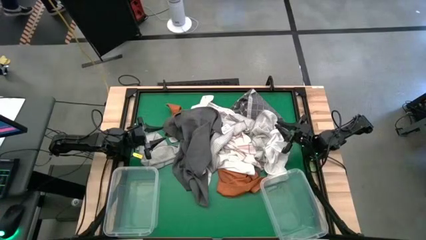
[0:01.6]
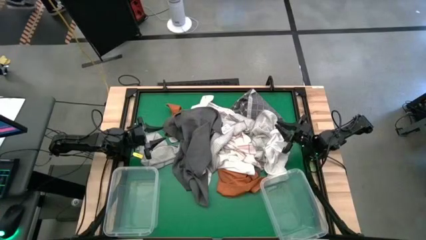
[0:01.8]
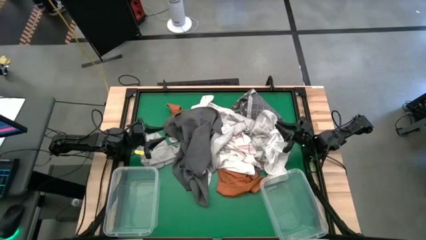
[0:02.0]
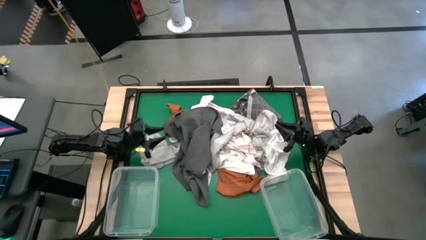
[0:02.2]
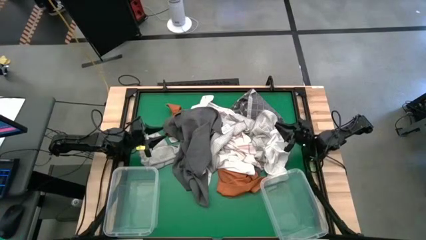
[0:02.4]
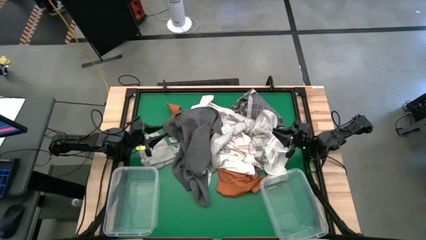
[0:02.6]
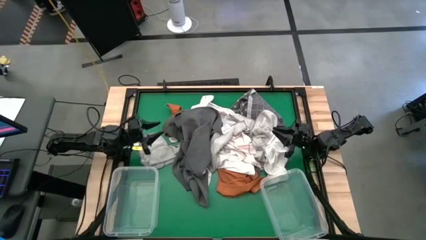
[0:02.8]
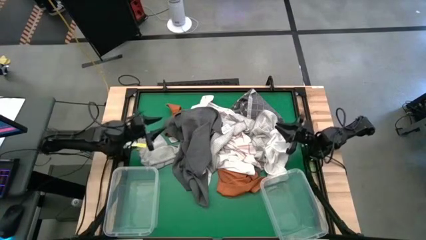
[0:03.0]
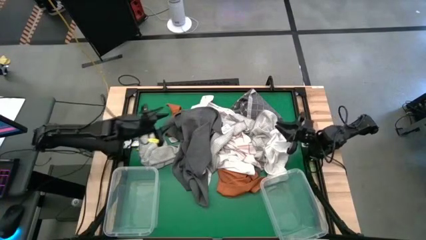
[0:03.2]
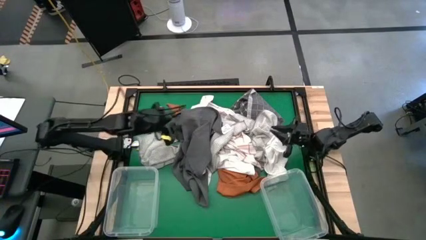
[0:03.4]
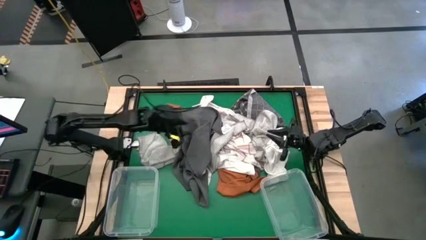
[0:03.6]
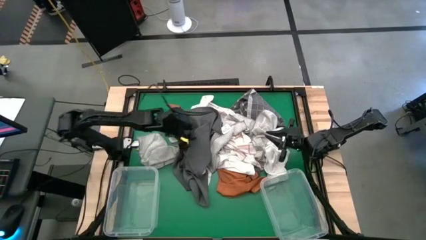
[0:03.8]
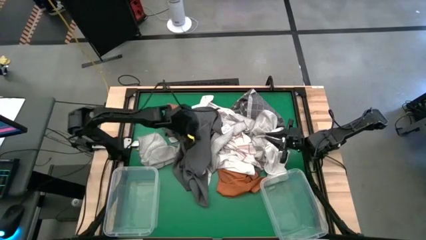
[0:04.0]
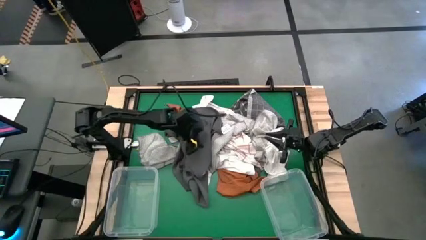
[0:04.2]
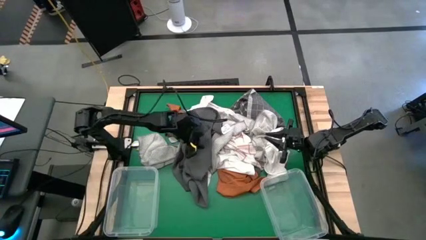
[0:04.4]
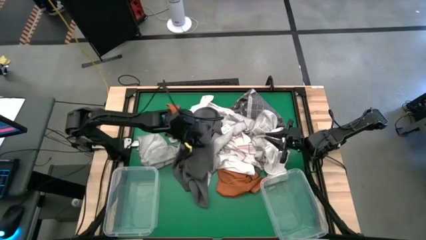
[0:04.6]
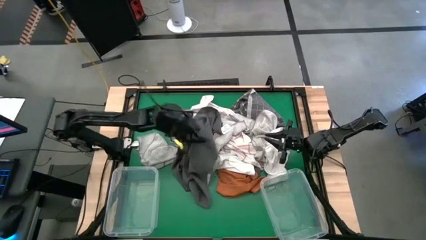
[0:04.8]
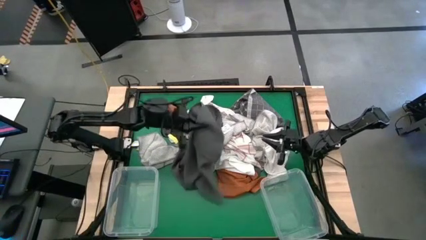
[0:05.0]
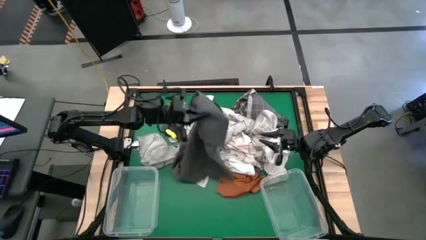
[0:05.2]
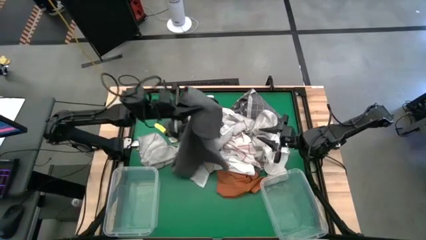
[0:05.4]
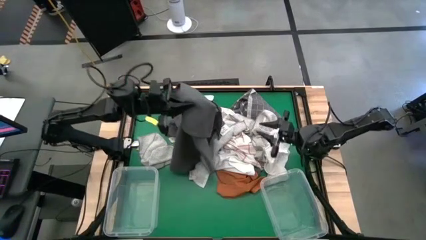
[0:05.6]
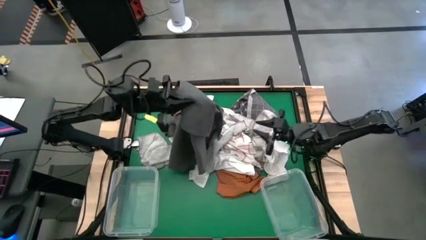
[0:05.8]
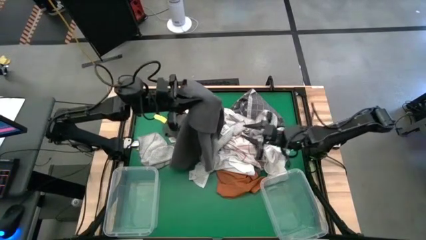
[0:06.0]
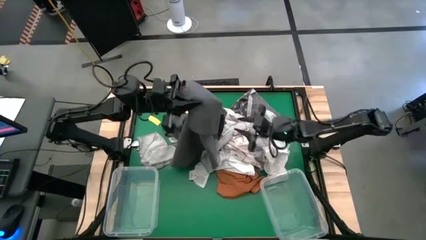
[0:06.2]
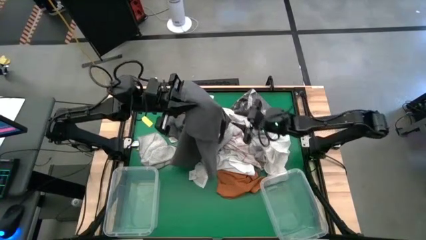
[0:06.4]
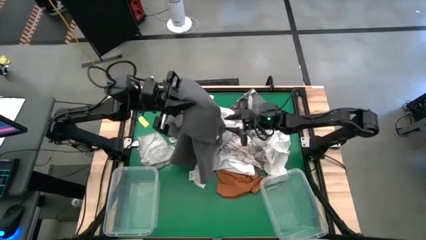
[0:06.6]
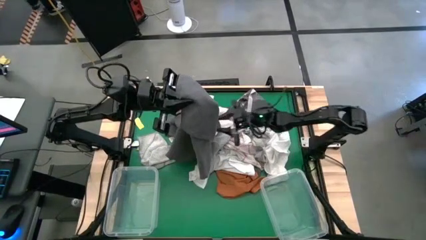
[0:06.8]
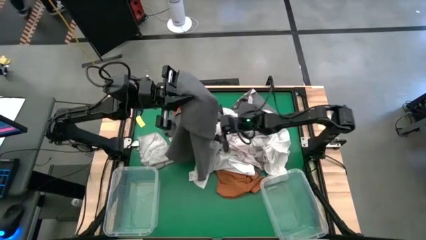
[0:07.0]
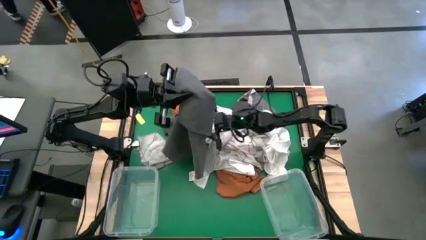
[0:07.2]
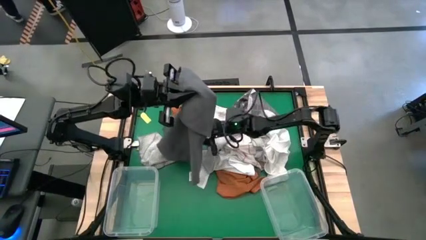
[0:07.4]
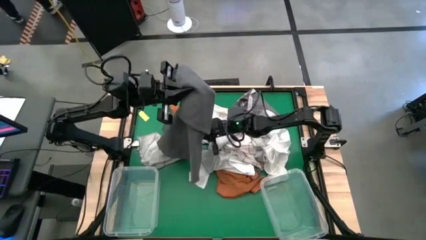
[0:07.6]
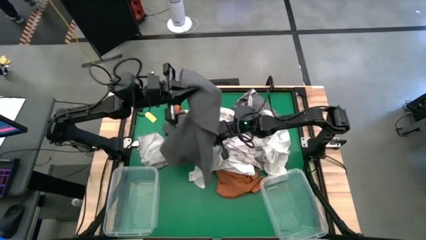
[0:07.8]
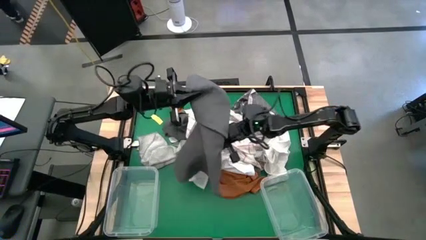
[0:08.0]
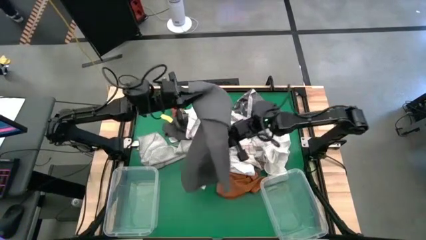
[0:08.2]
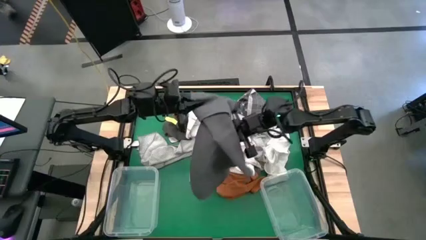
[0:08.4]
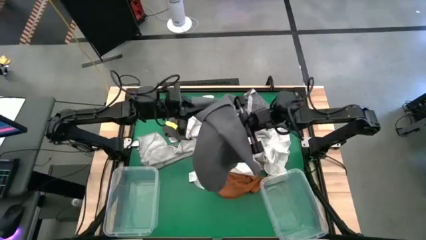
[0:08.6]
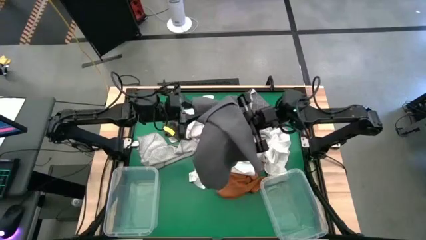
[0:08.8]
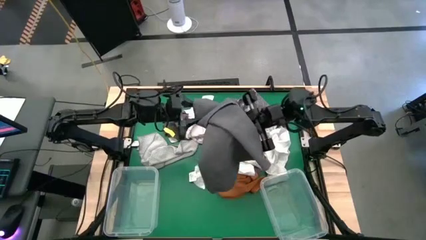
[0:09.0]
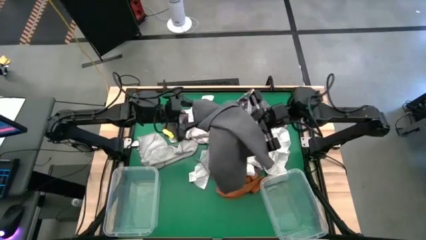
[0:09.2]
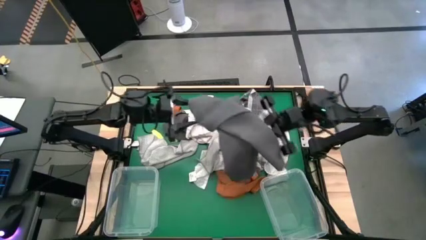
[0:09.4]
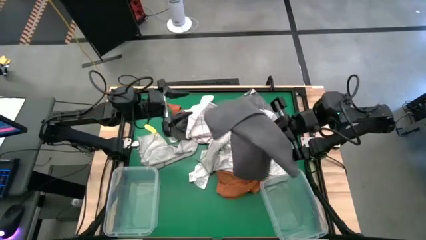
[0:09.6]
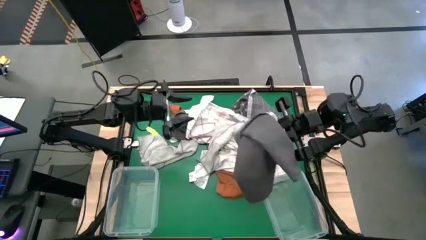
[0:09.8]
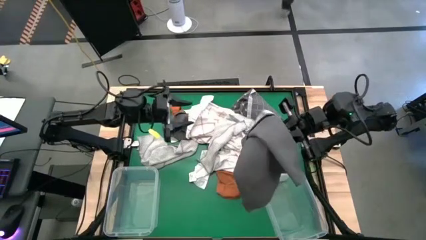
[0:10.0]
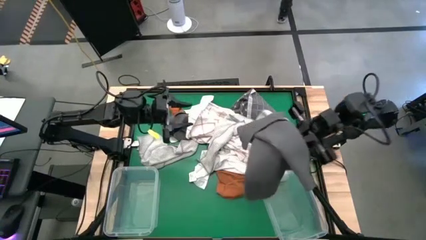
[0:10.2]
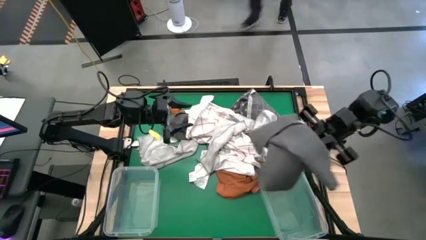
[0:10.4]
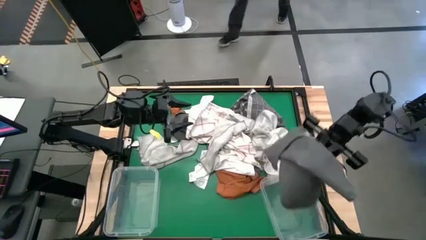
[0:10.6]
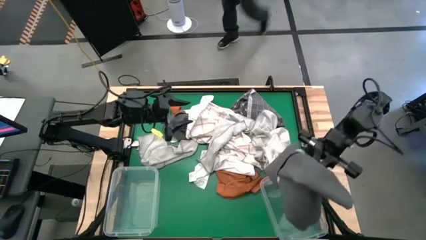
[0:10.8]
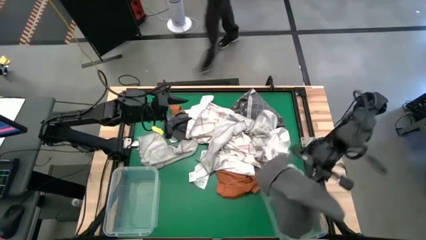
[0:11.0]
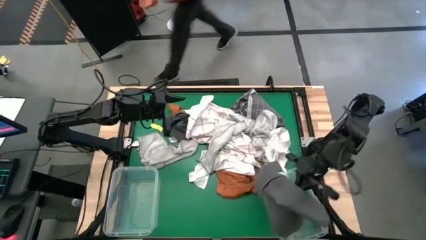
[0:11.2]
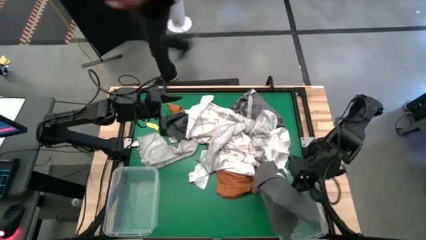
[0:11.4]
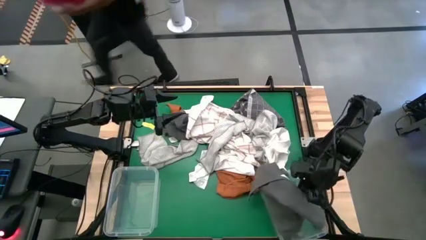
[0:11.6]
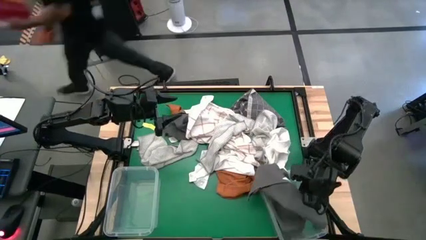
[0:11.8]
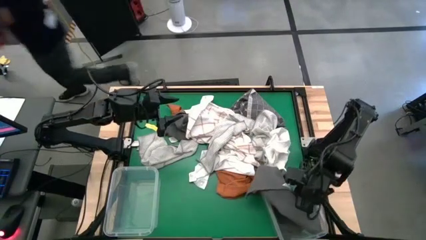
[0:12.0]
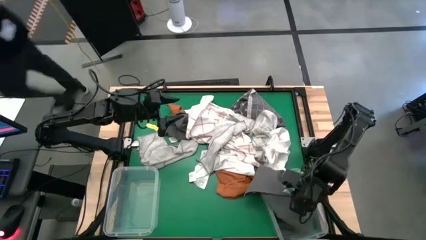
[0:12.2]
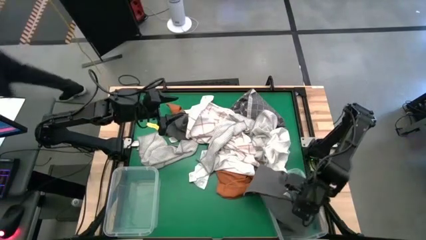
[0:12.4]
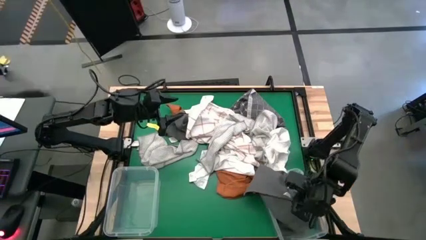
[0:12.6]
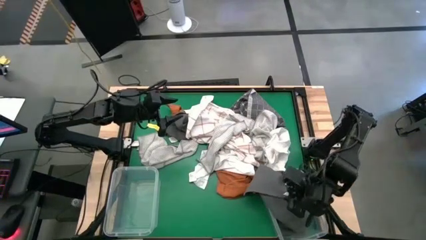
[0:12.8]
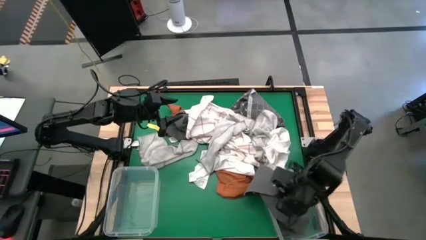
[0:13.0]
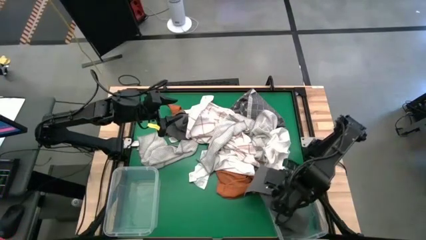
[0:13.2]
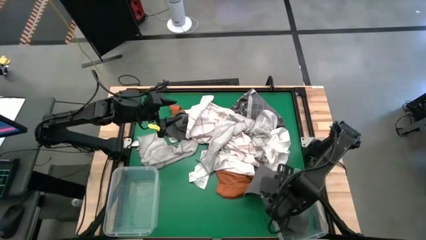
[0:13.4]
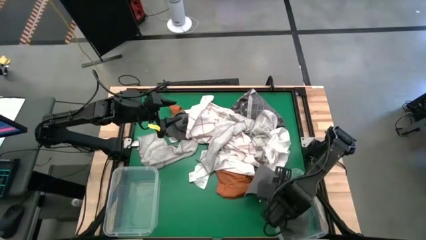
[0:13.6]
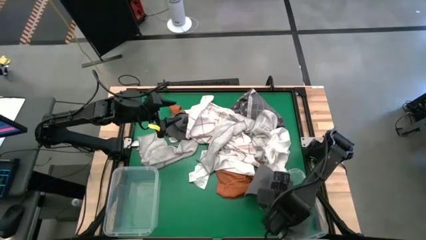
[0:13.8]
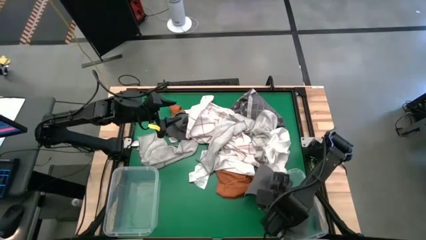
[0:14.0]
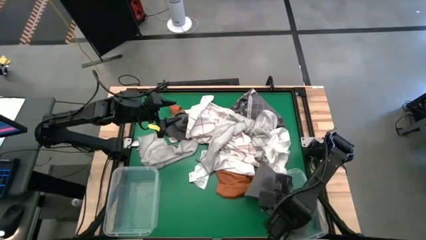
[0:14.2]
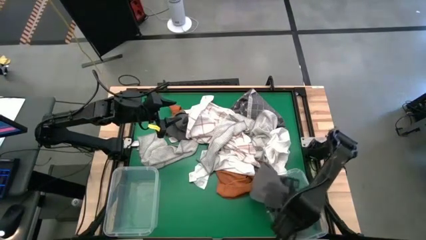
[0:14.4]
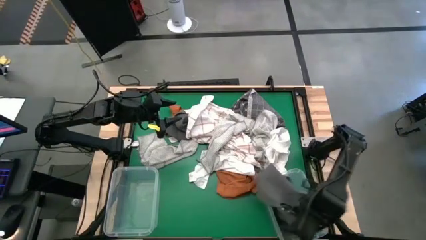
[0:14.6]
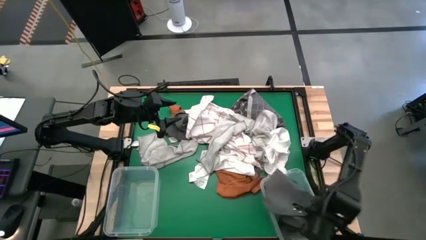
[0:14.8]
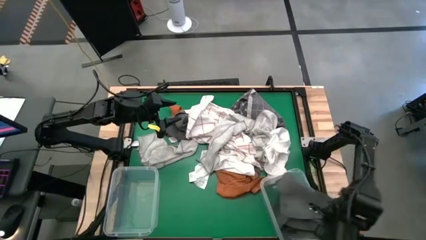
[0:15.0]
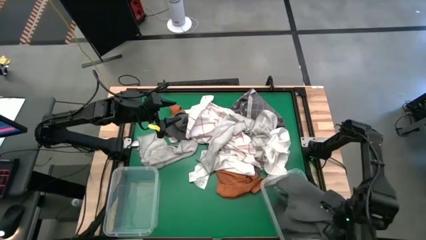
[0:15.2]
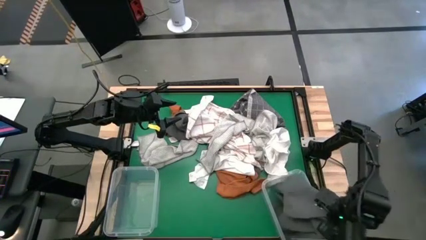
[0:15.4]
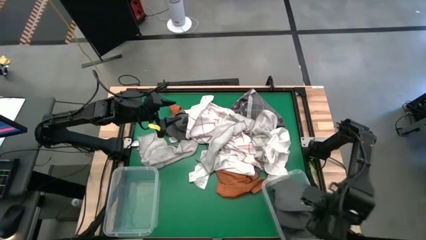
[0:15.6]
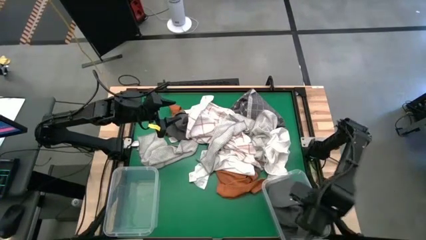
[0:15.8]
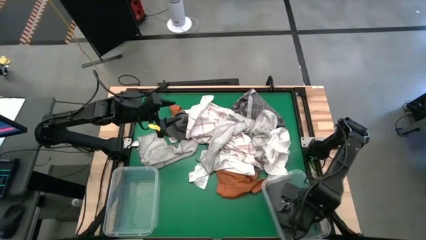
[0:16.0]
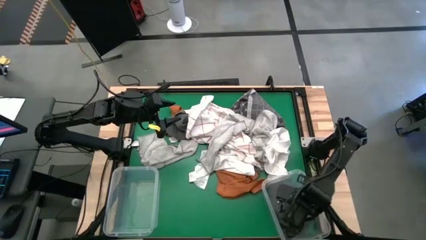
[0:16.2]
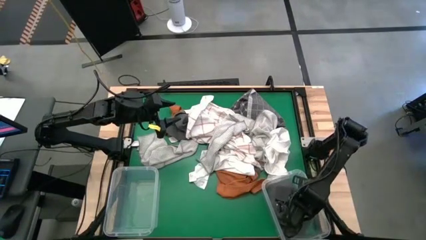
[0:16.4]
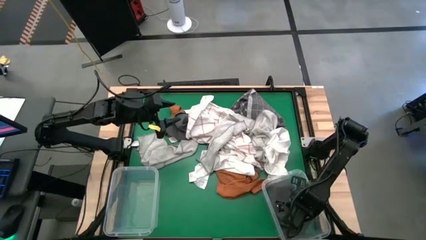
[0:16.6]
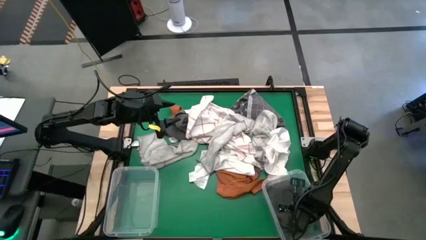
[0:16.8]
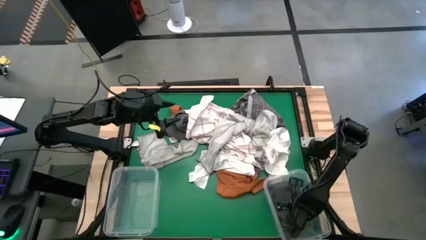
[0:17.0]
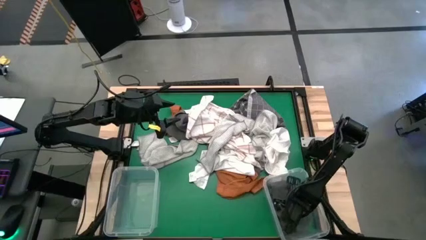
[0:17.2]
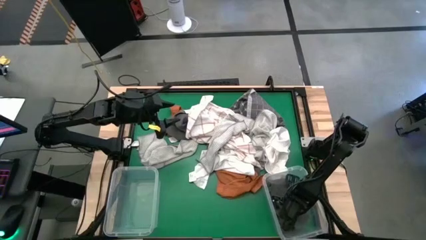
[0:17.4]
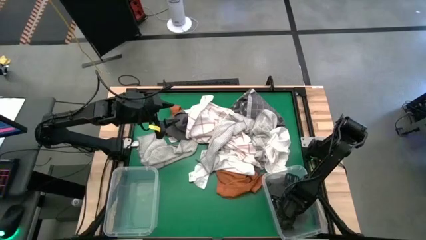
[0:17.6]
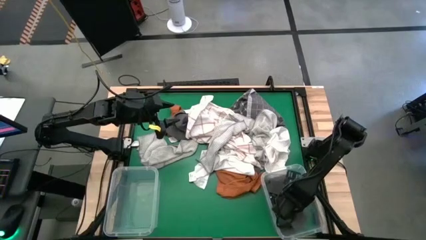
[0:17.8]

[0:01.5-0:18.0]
Task: Sort towels by color in basket
Put the gray towel into the right transparent bin
